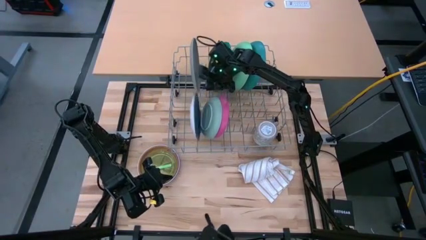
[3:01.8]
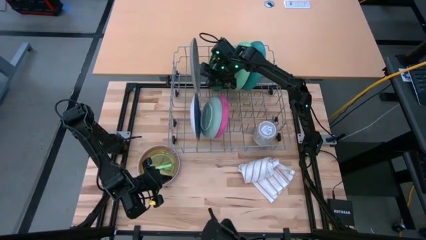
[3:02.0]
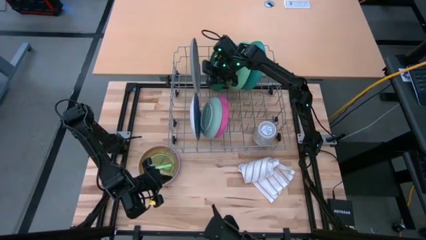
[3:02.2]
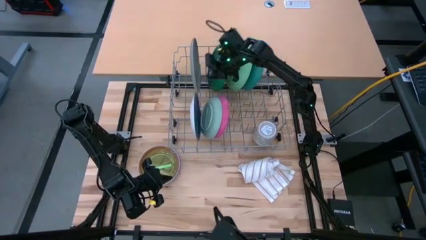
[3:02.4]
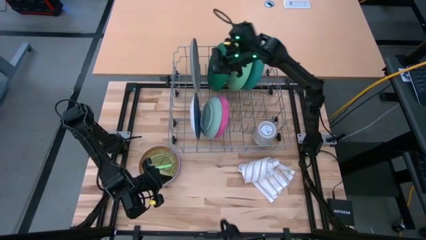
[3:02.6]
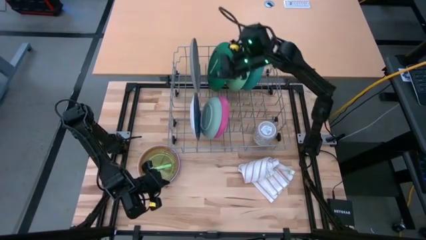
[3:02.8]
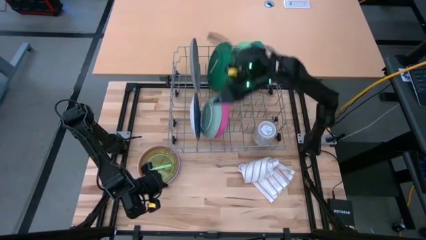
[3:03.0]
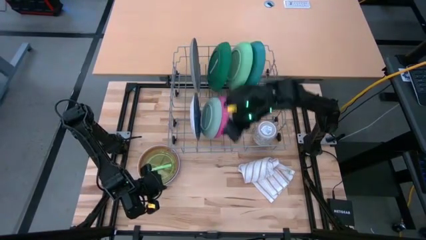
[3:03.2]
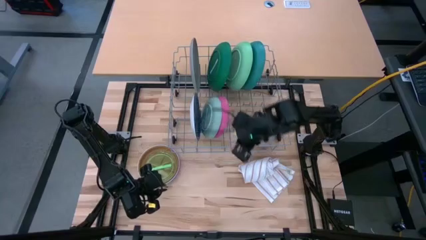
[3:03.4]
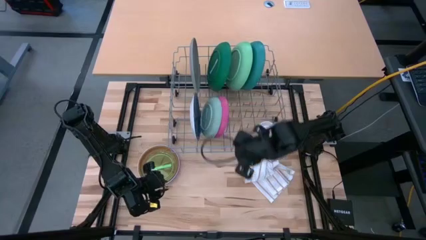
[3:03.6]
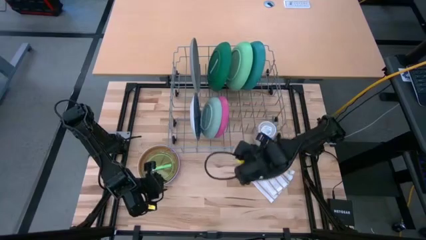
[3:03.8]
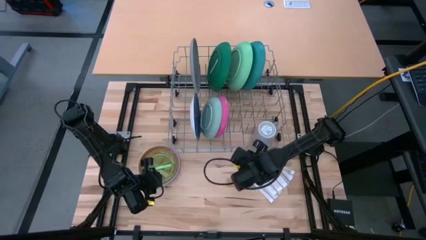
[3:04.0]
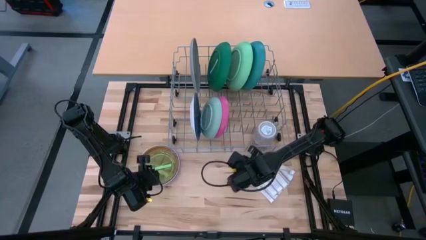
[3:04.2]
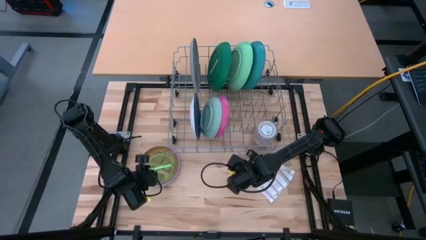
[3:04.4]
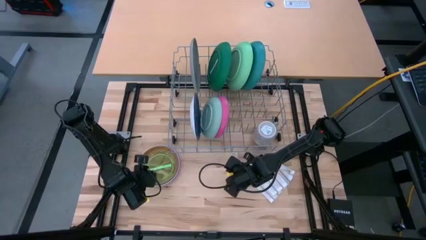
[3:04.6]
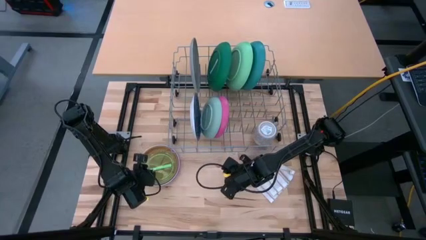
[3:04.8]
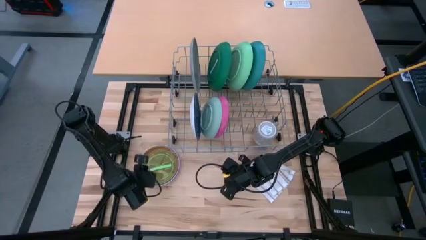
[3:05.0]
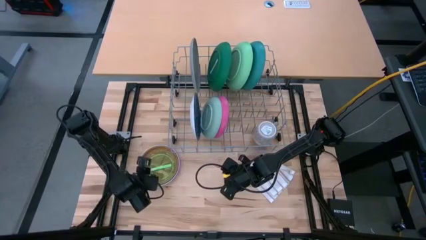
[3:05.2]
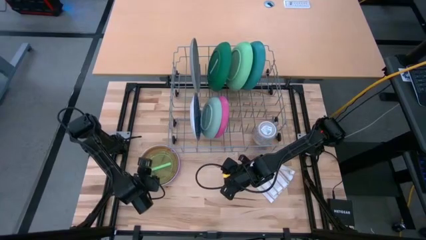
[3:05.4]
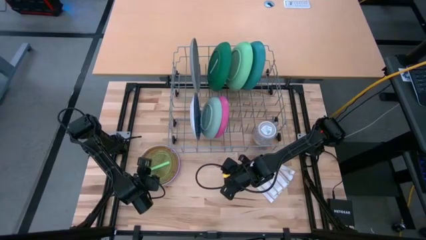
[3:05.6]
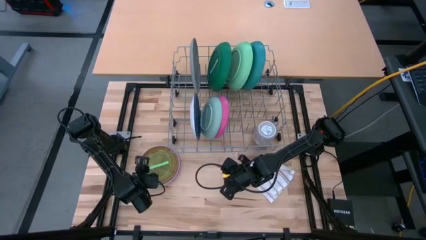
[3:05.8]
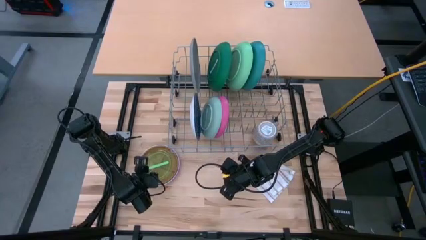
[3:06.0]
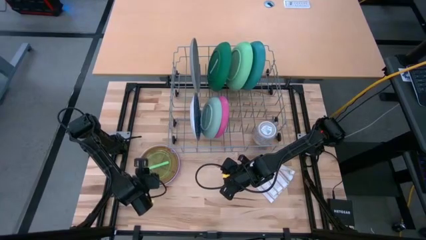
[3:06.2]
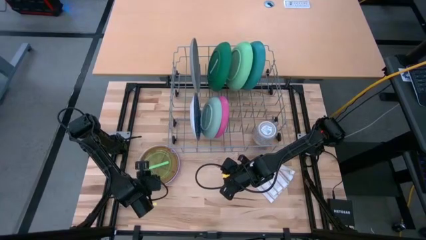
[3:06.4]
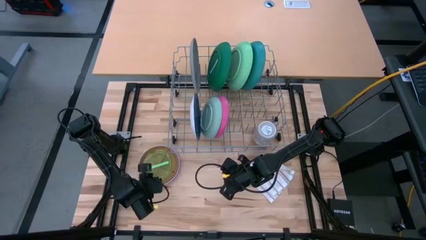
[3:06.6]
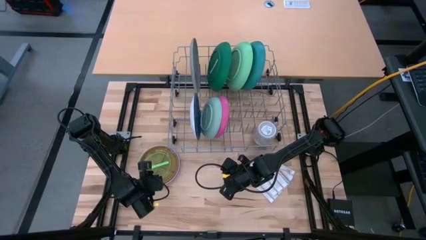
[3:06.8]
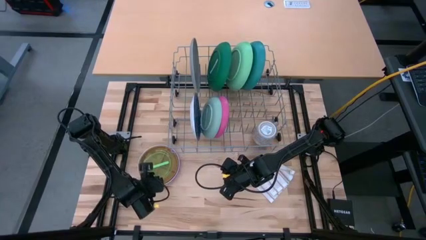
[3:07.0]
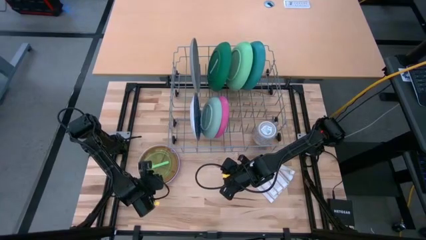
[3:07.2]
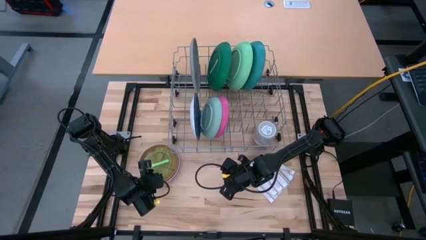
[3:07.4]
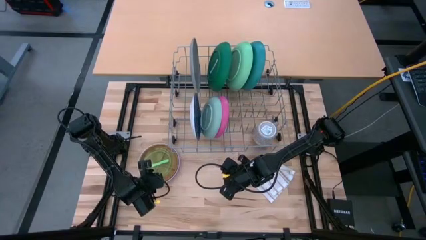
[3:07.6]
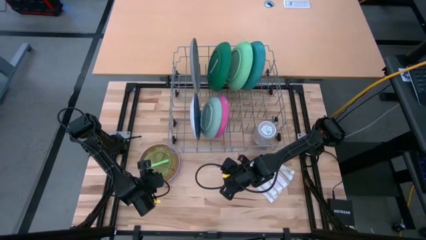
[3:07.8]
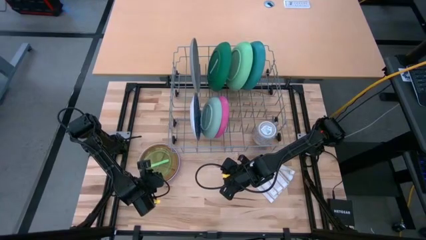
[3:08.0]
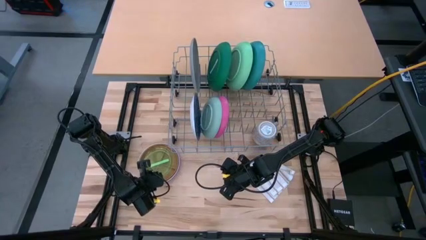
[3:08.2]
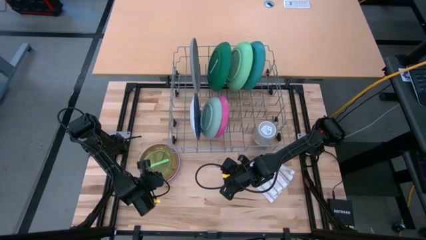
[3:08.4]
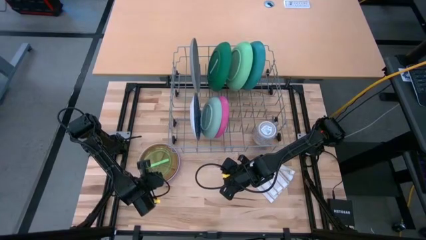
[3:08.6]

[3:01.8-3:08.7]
Task: Sort dishes
Put the green transparent plate in the dish rack

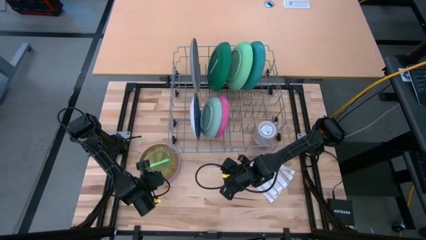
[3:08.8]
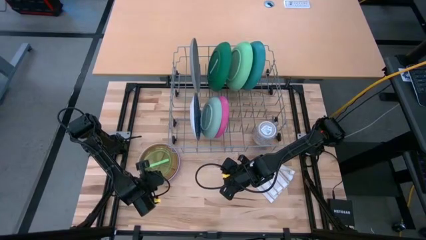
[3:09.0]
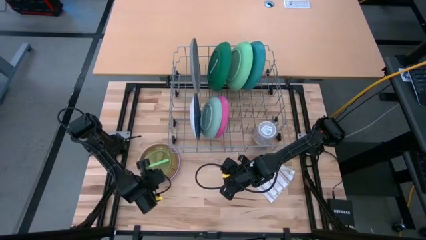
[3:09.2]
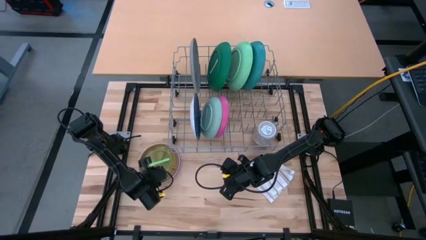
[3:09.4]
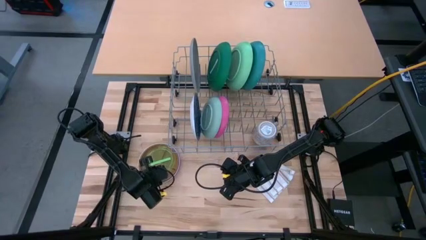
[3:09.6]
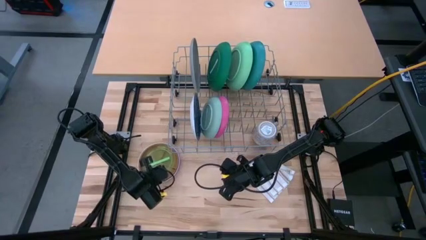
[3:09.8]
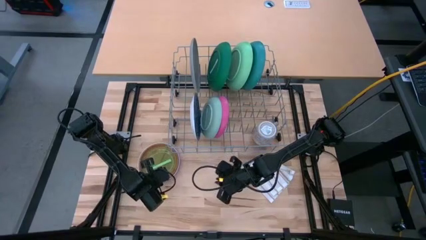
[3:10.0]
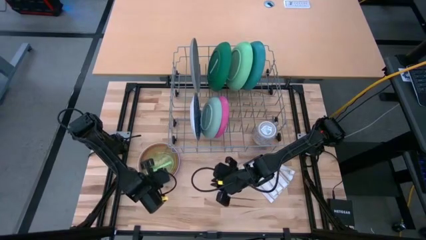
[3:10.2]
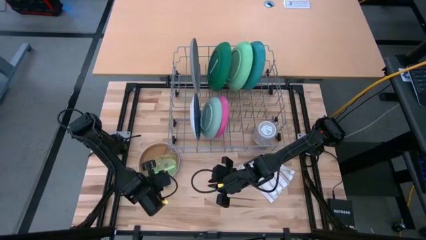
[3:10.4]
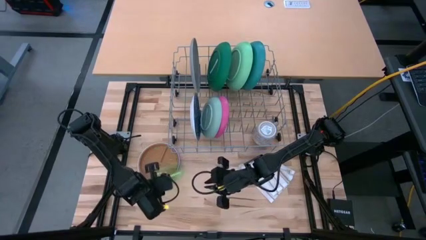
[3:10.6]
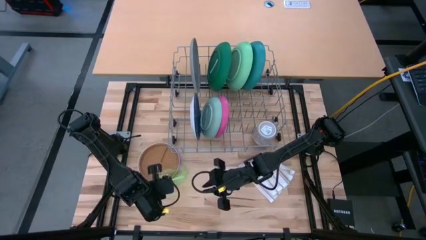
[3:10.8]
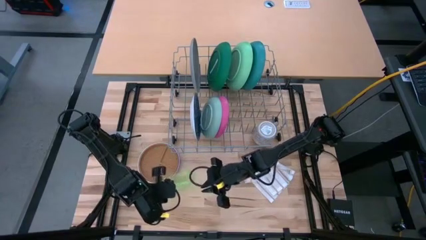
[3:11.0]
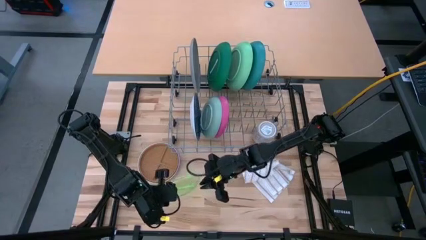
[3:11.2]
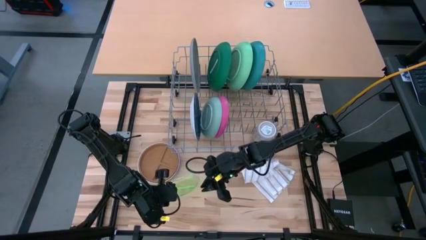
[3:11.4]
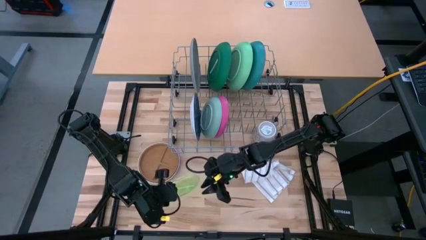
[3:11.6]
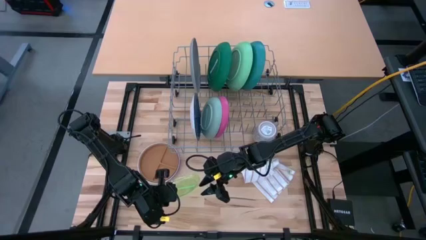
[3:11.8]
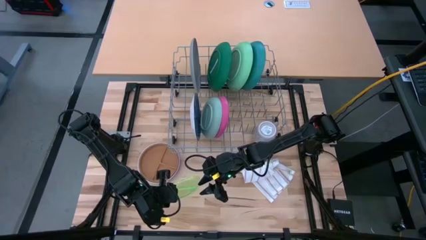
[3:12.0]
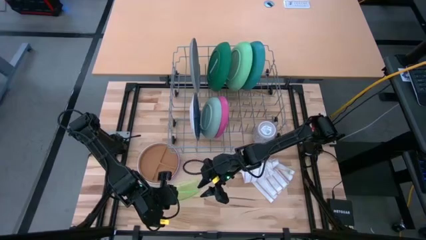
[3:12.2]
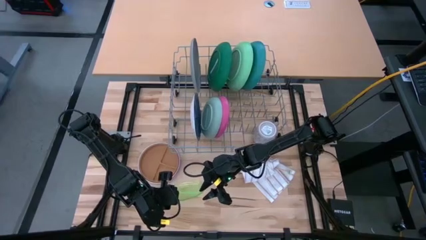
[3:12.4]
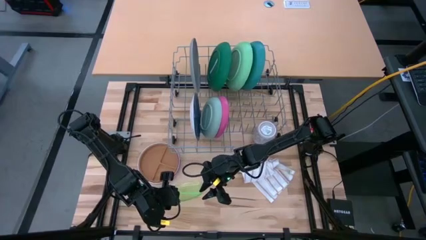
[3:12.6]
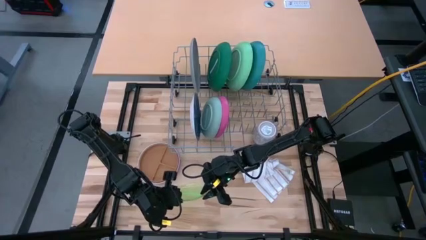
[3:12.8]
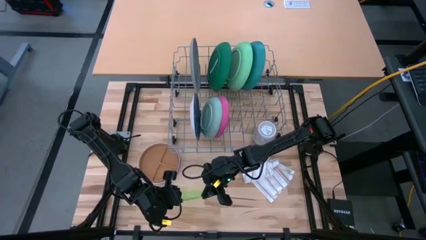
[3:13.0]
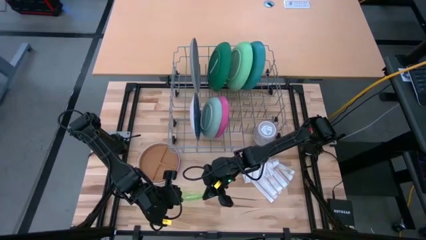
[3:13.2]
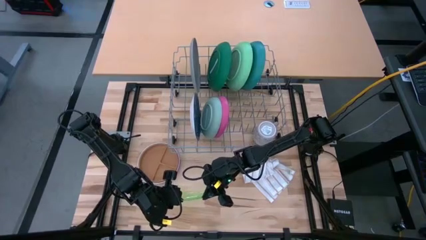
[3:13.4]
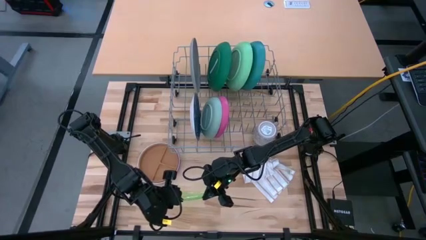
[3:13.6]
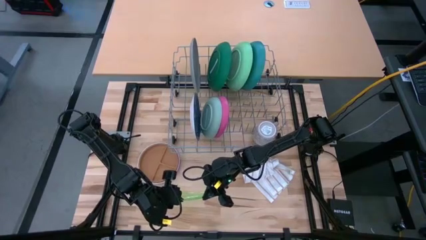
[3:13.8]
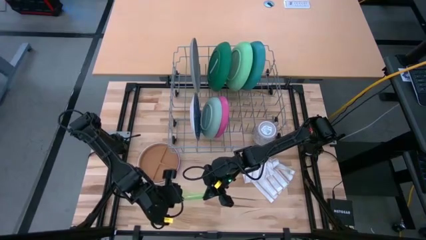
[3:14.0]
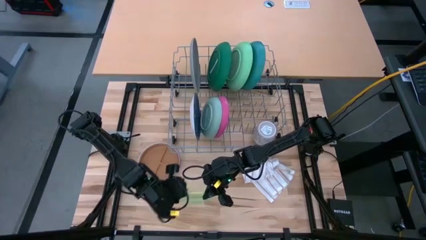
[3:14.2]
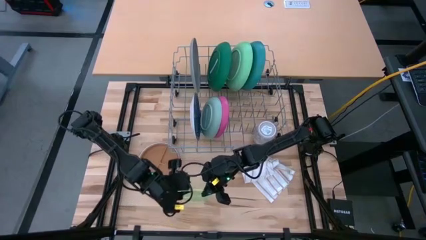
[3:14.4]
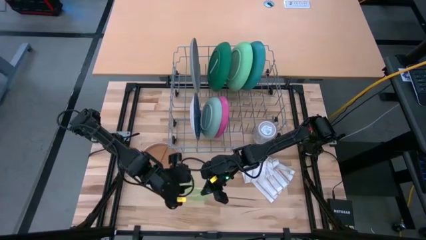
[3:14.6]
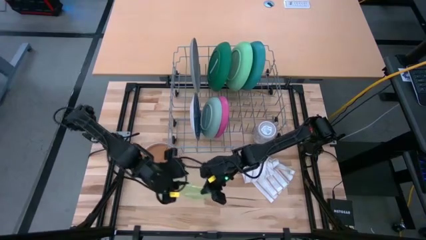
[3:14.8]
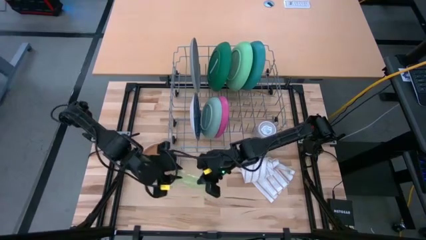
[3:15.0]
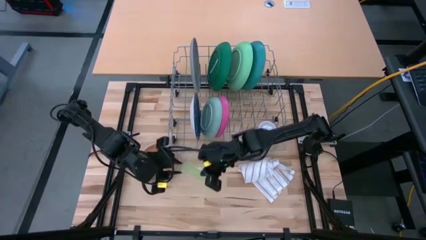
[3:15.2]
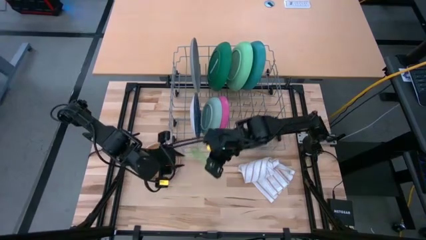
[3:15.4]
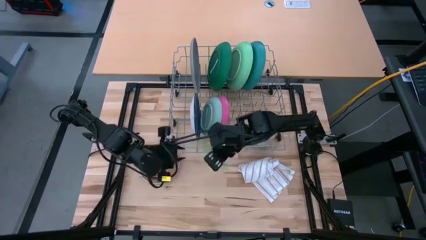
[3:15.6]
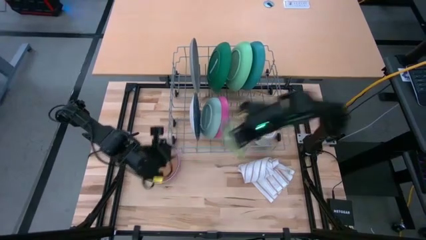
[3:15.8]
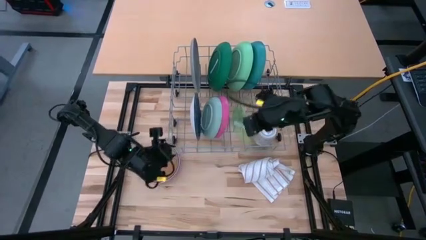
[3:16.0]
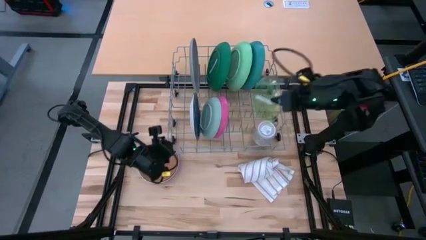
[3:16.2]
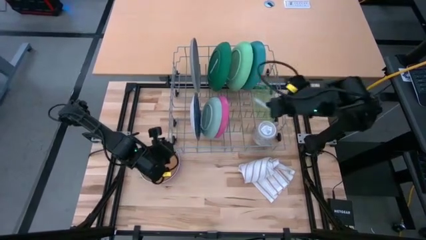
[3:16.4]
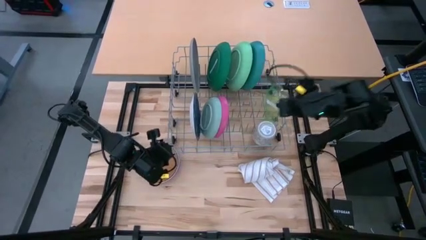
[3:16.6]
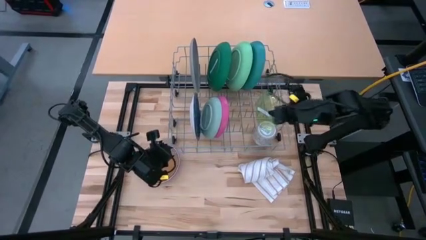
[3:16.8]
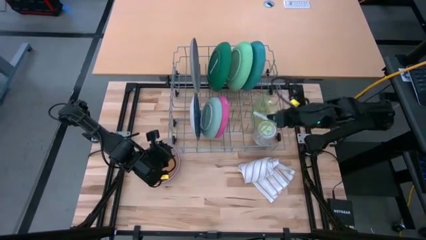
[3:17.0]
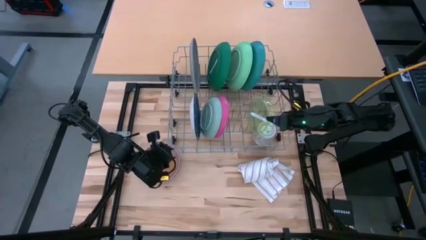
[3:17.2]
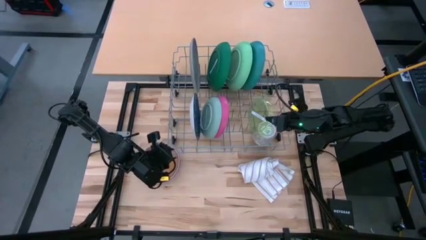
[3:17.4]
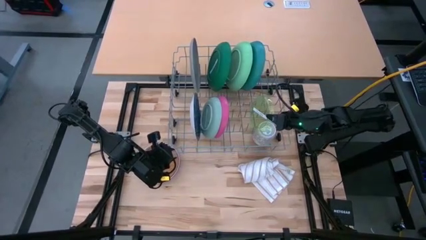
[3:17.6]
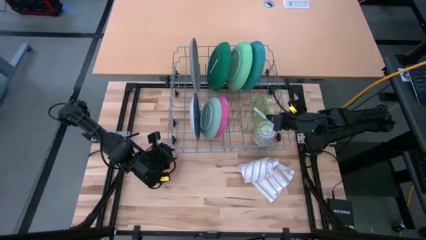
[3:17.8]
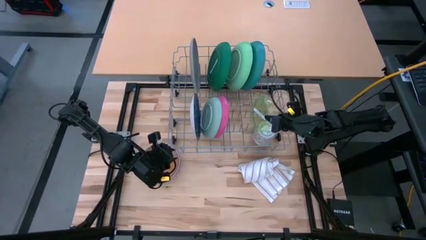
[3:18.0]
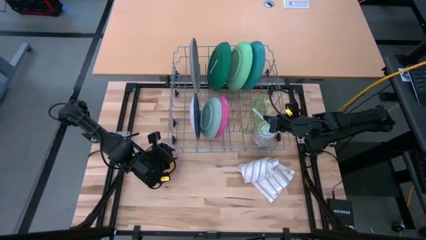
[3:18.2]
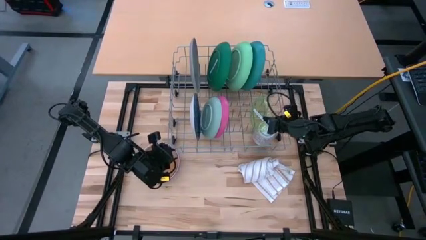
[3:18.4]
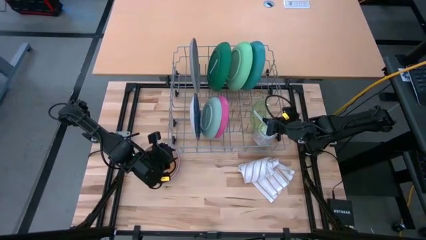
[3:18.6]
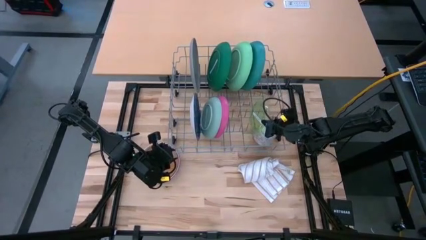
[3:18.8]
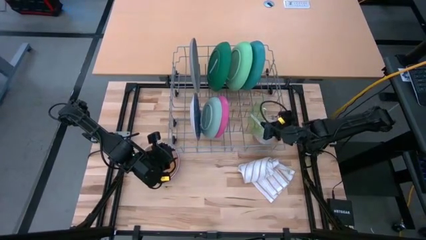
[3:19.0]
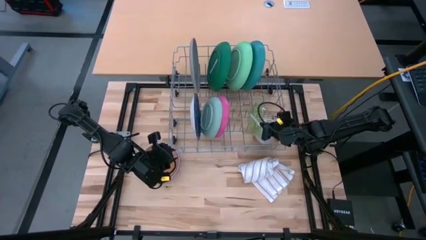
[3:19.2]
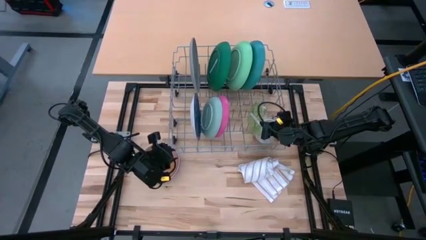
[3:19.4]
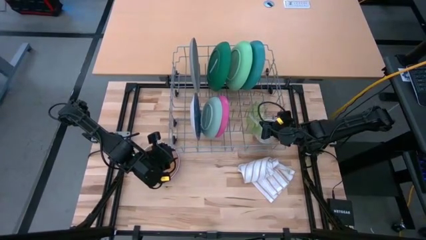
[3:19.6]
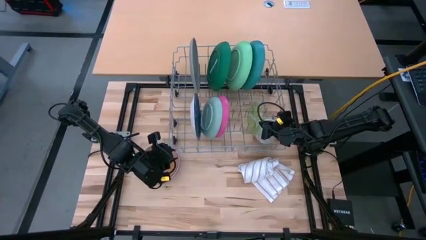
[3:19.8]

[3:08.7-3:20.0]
Put the green transparent plate in the dish rack
